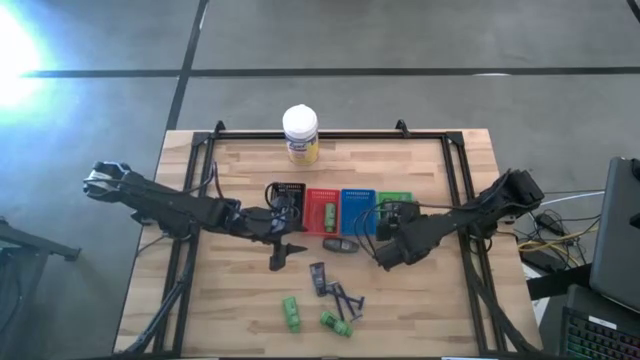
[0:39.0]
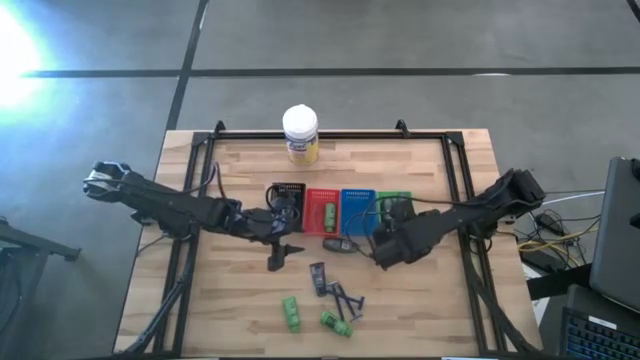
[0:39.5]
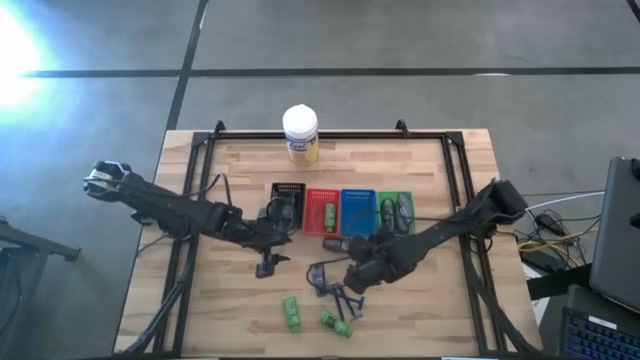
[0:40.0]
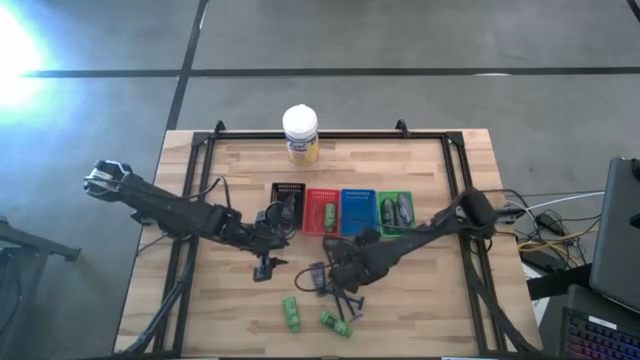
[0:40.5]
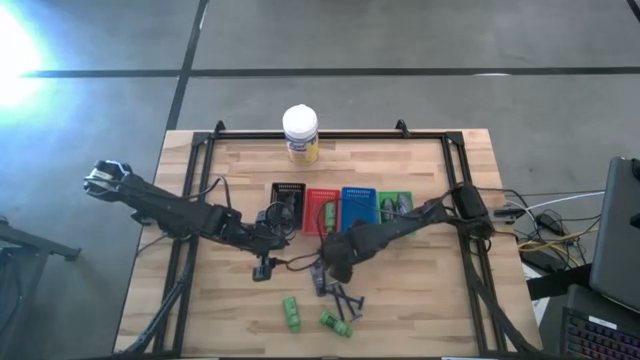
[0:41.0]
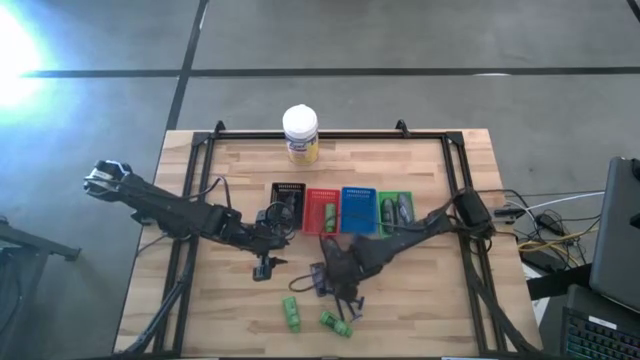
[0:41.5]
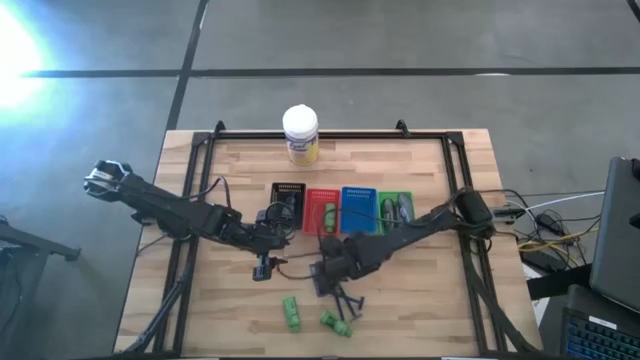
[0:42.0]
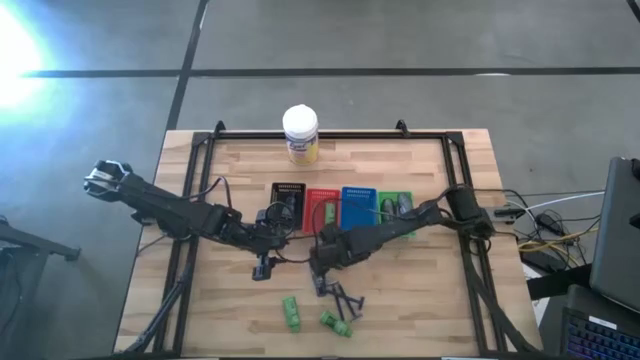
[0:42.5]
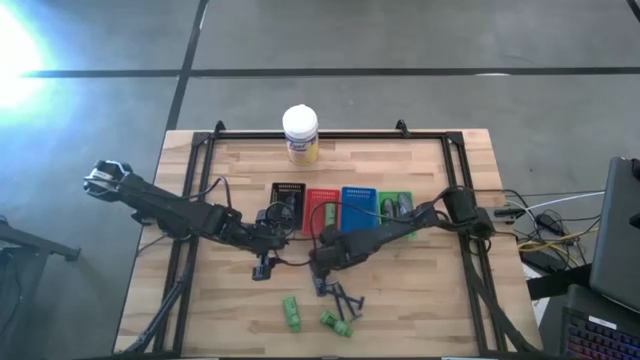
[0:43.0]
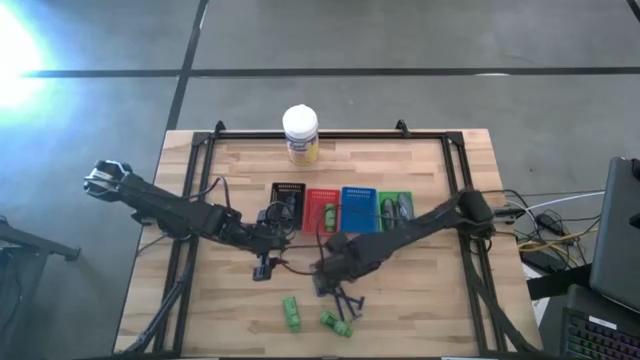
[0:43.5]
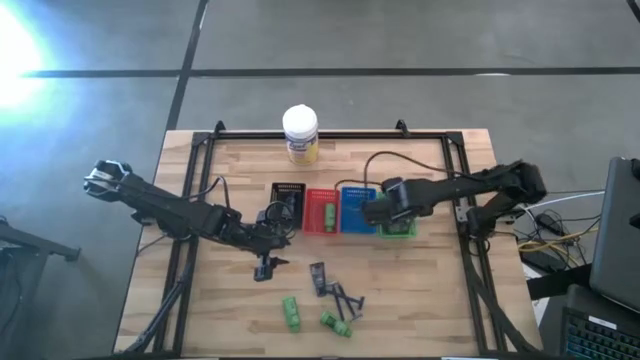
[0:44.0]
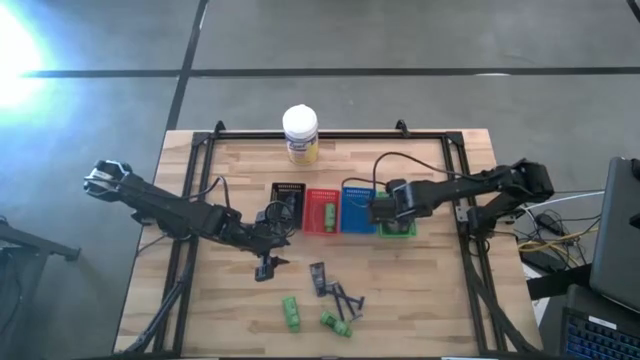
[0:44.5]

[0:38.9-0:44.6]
Task: Pick & Place Travel size toiletries
Put the gray deodorant into the green basket

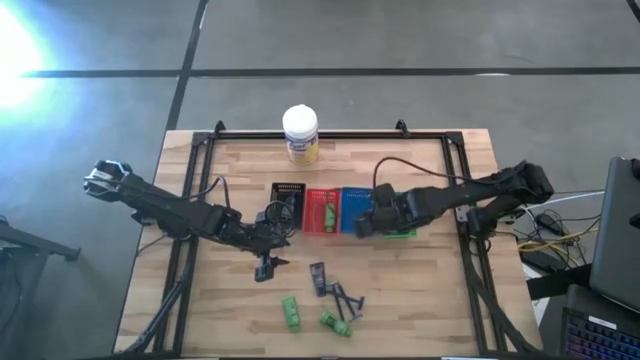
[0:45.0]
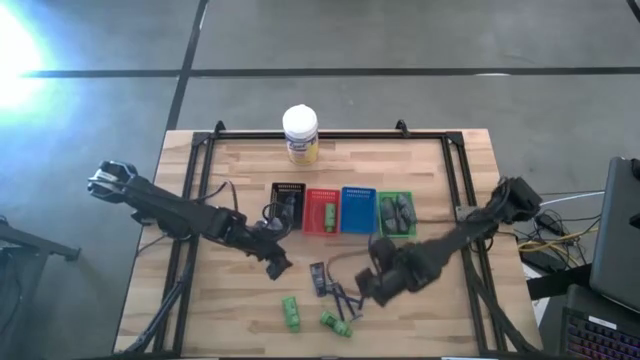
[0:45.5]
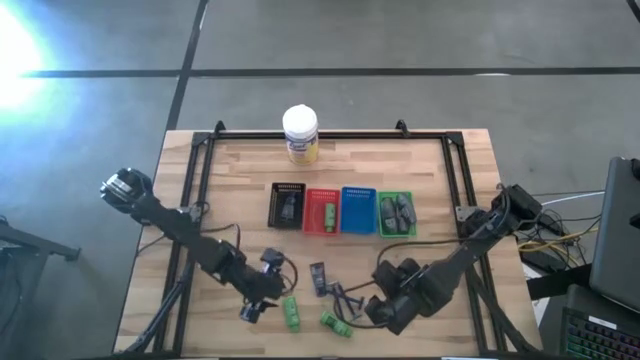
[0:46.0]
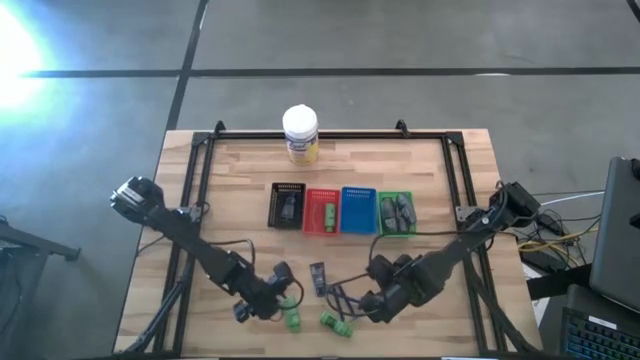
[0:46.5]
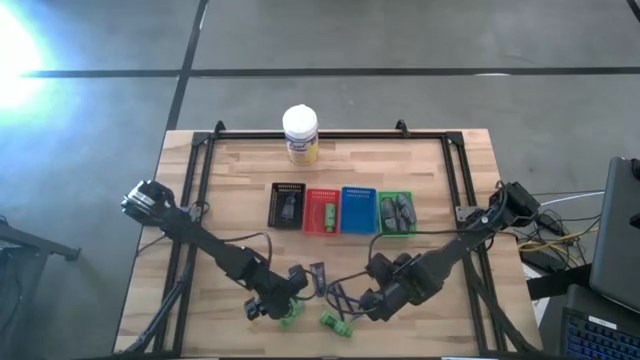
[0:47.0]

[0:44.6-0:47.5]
Put the green shampoo bottle into the red basket

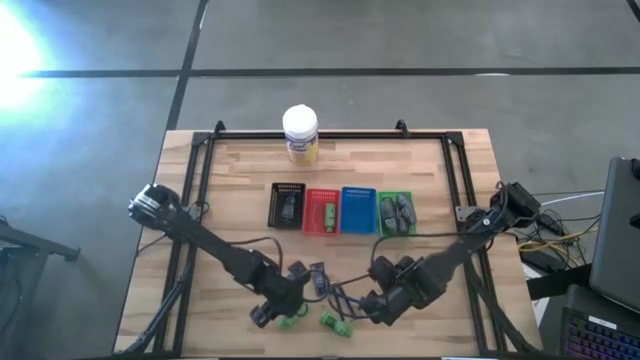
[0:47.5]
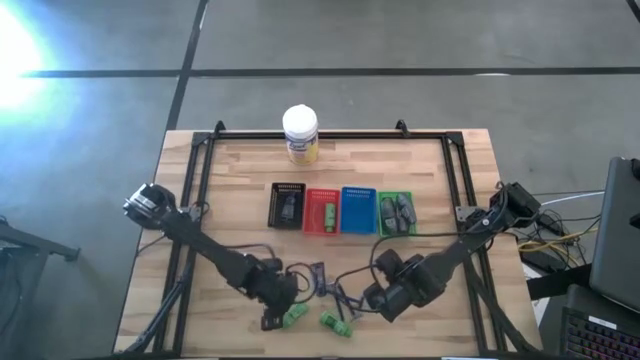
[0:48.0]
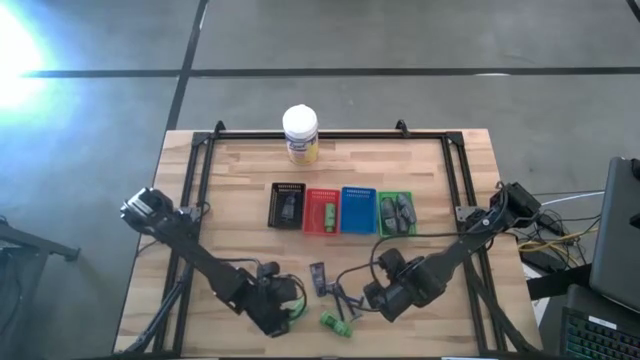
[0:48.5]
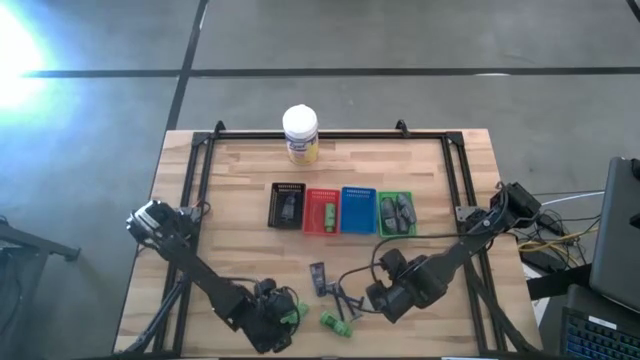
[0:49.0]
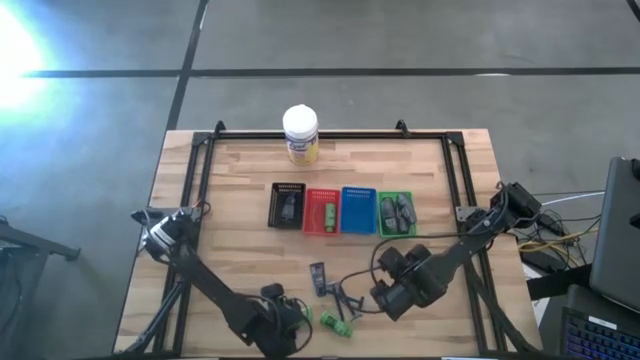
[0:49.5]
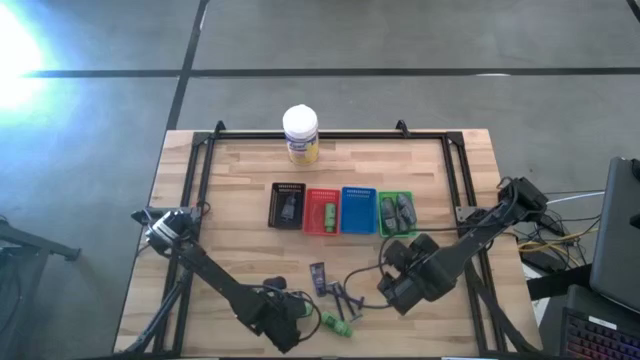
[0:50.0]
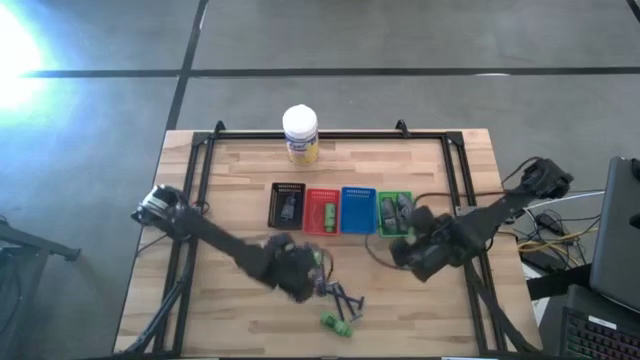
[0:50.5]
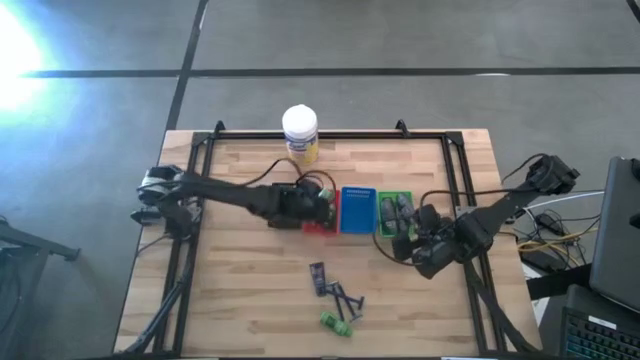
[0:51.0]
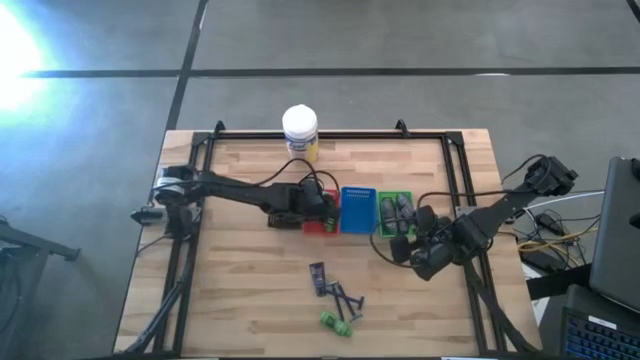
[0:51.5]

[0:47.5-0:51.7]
Put the green shampoo bottle into the red basket

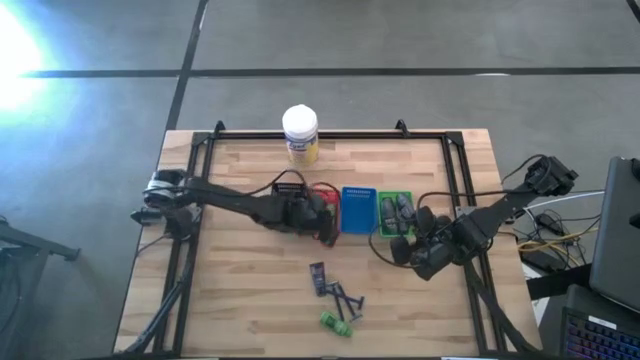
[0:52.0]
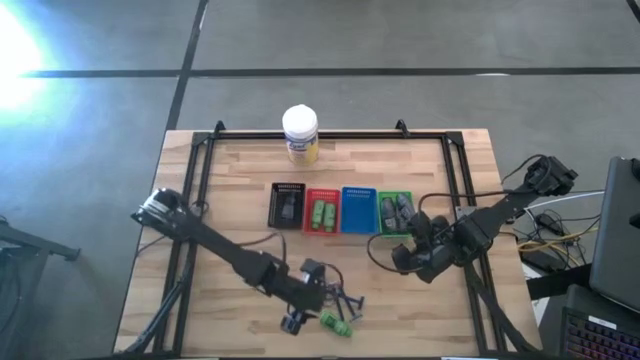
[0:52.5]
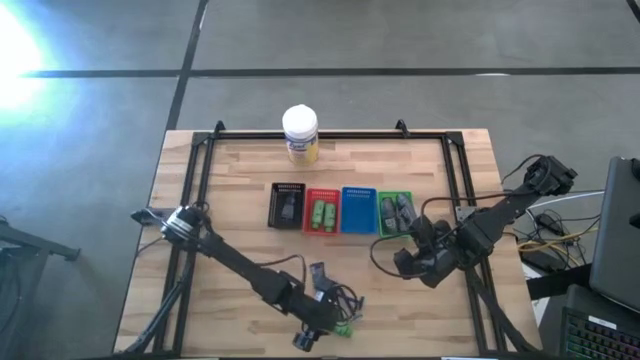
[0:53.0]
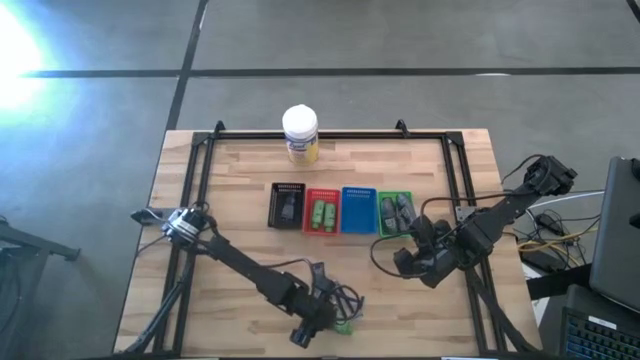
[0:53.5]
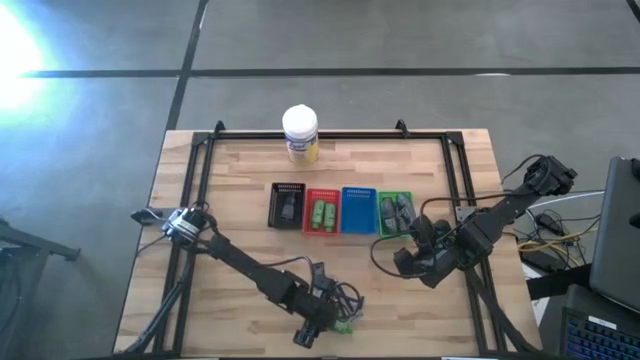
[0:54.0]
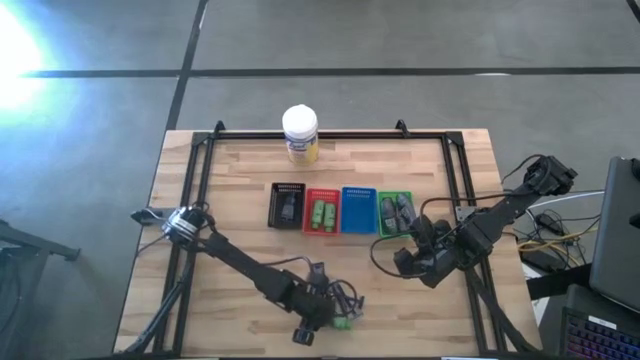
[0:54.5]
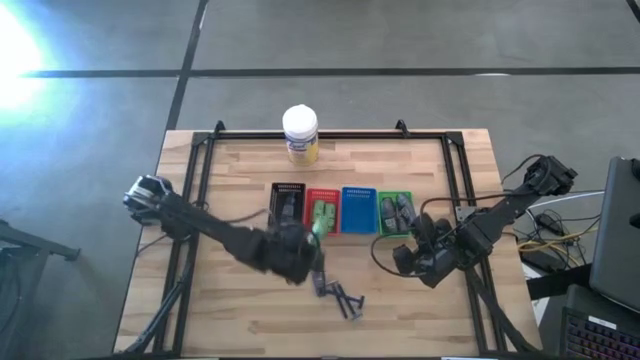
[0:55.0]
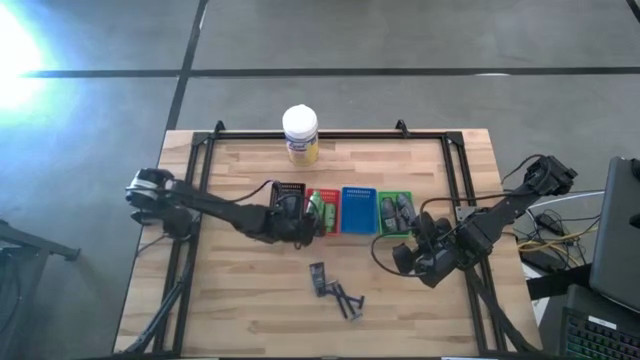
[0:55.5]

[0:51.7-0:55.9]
Put the green shampoo bottle into the red basket

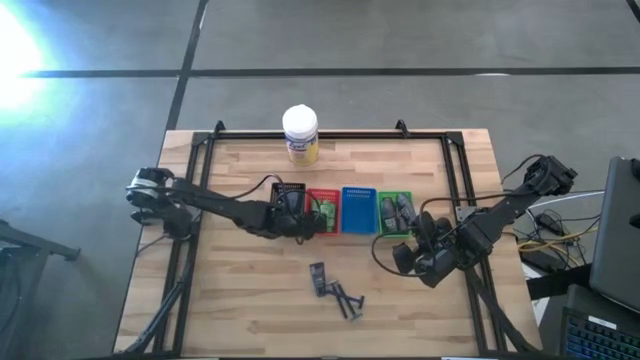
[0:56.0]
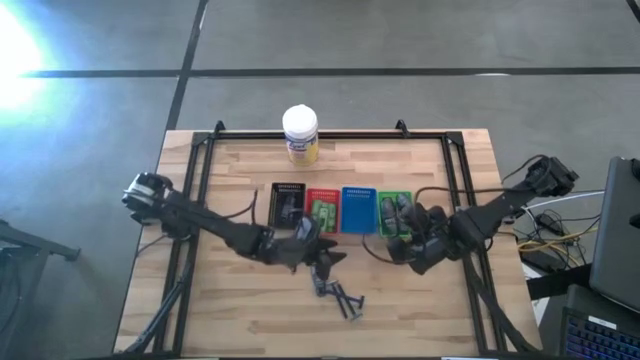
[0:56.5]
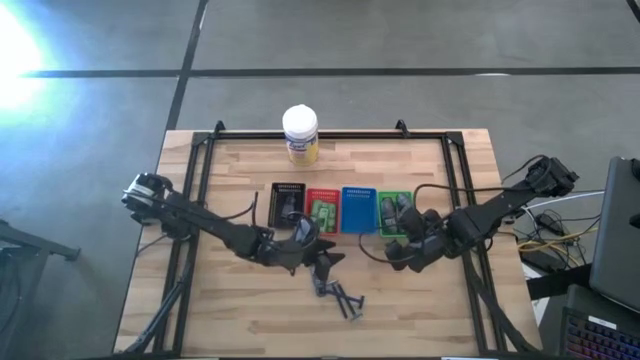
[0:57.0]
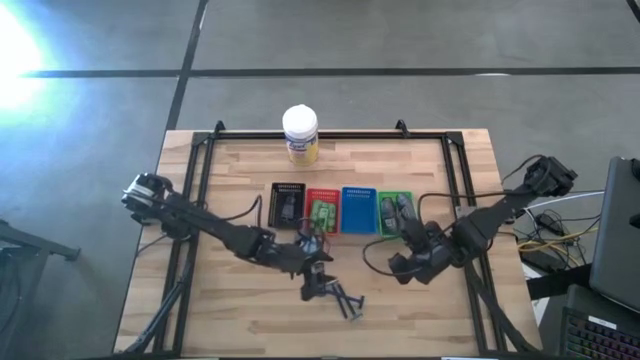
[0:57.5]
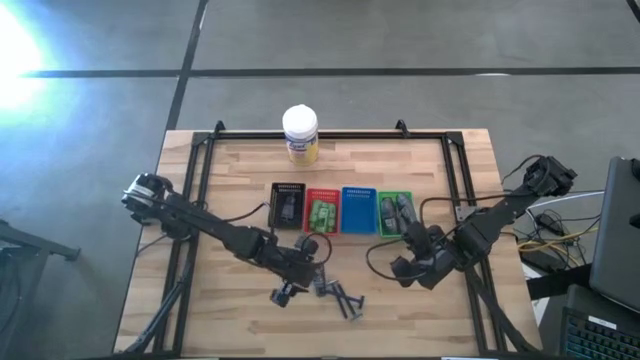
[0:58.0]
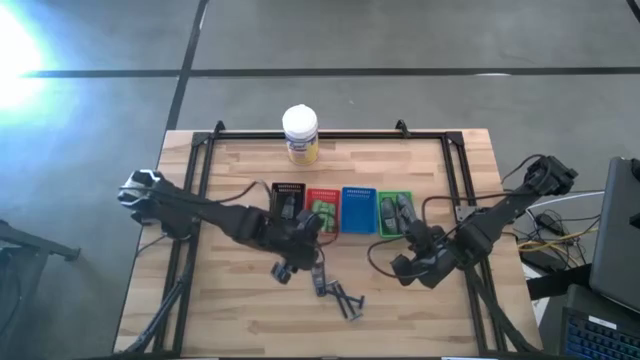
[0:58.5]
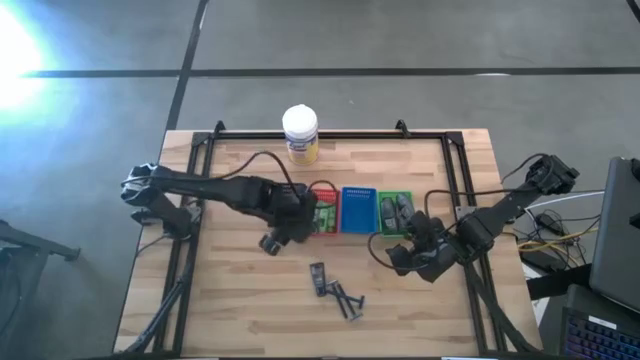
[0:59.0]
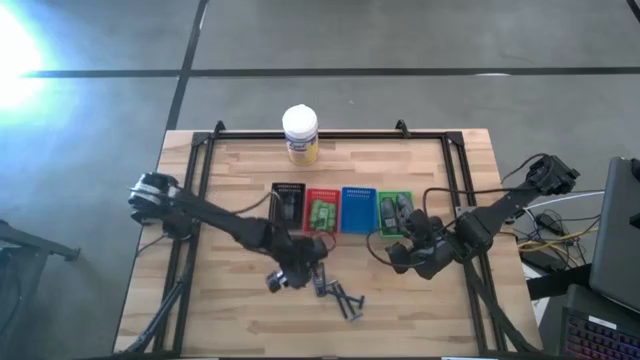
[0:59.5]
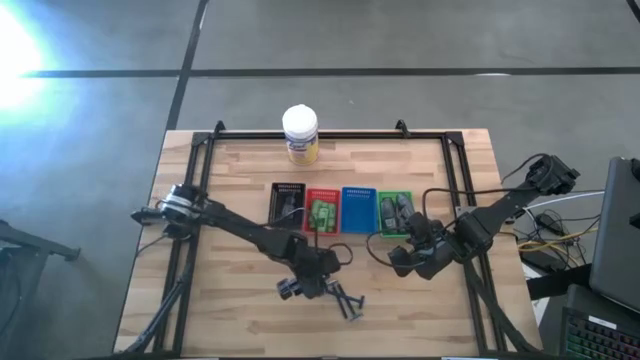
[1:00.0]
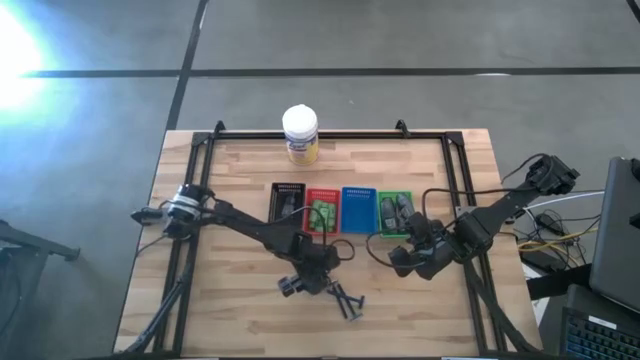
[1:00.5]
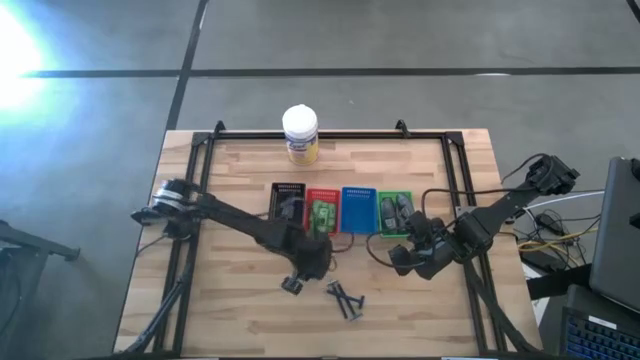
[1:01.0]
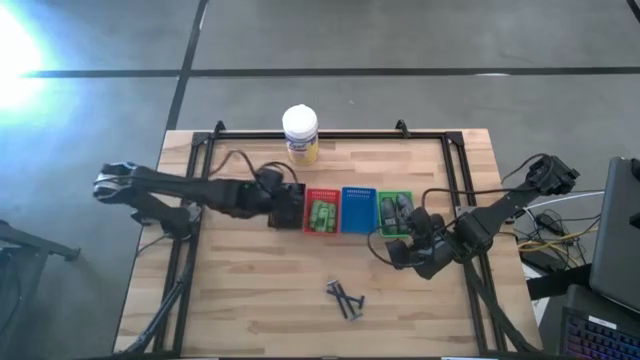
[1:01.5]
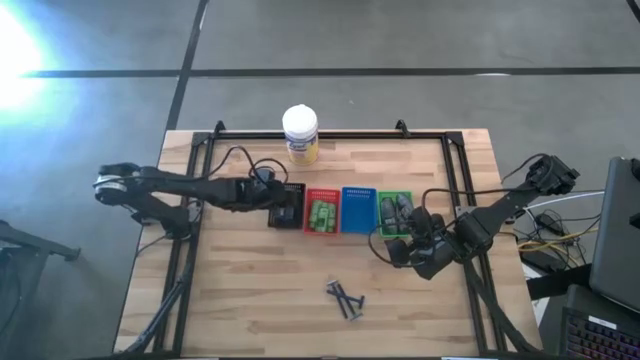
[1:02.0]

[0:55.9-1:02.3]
Put the blue shave cream into the black basket
